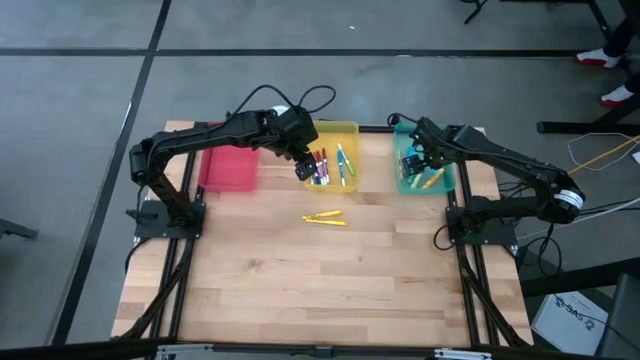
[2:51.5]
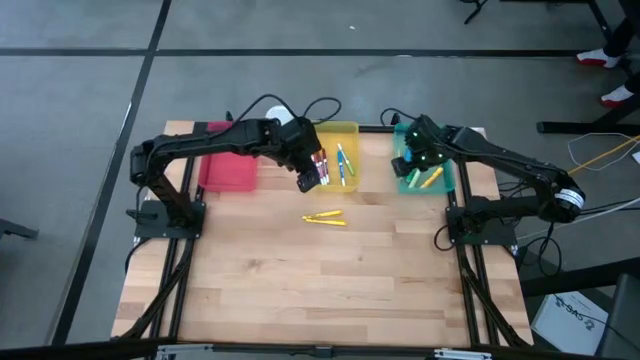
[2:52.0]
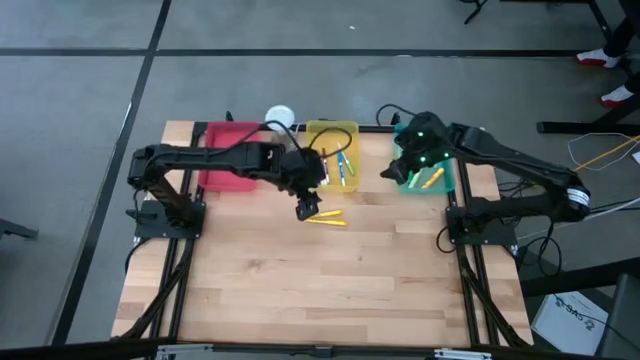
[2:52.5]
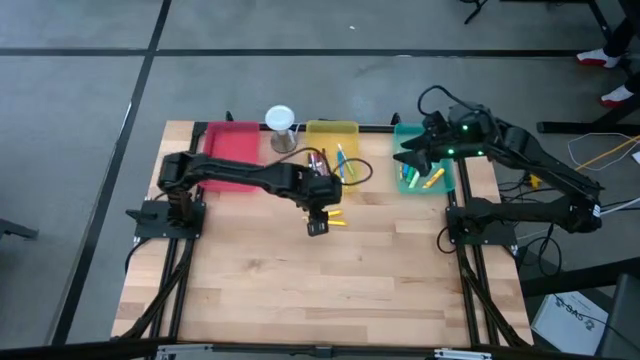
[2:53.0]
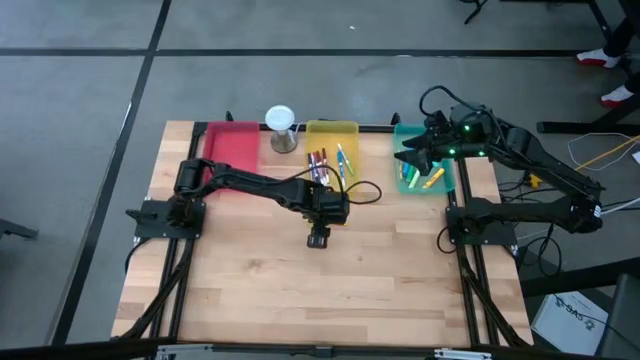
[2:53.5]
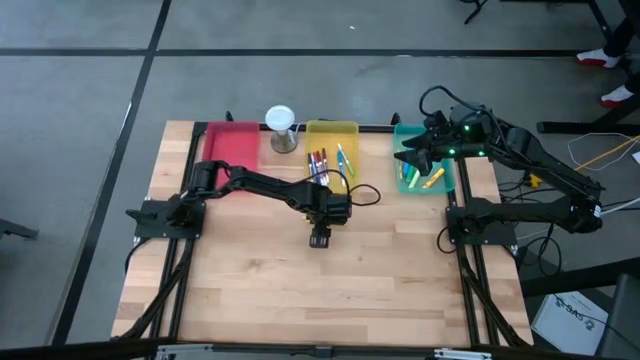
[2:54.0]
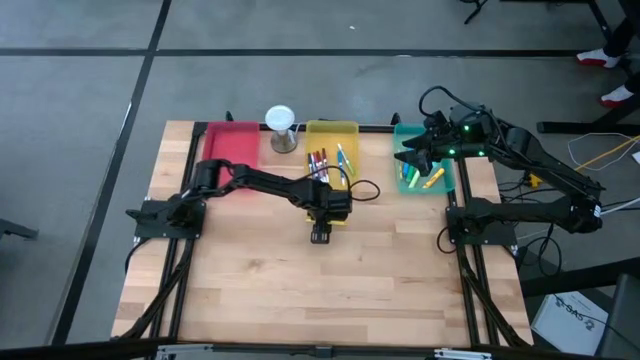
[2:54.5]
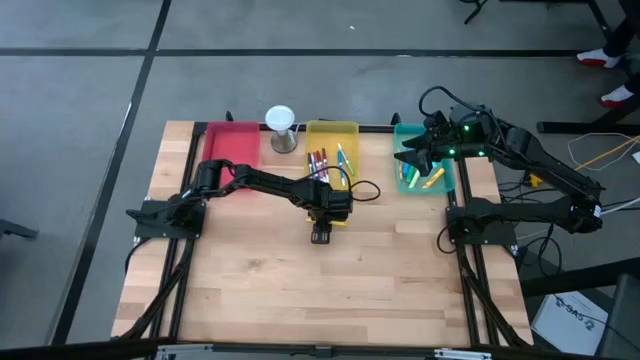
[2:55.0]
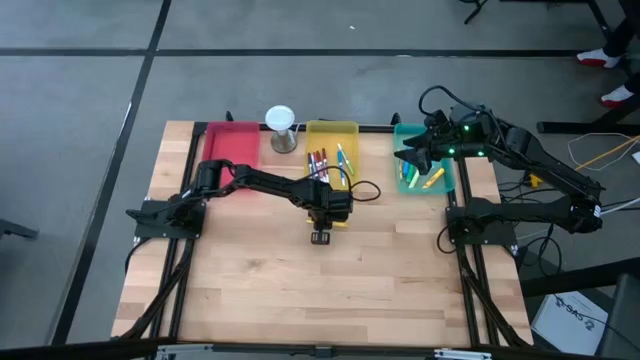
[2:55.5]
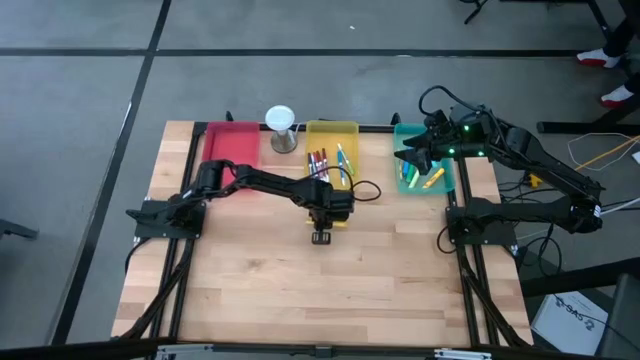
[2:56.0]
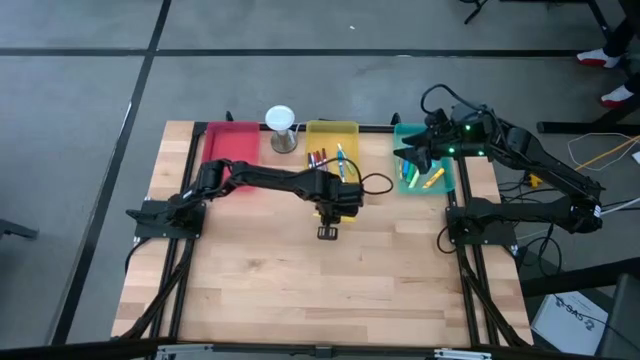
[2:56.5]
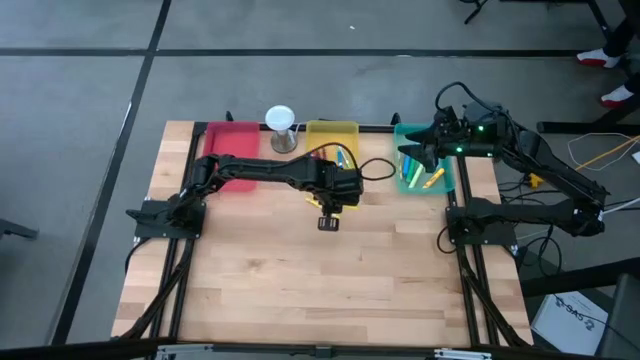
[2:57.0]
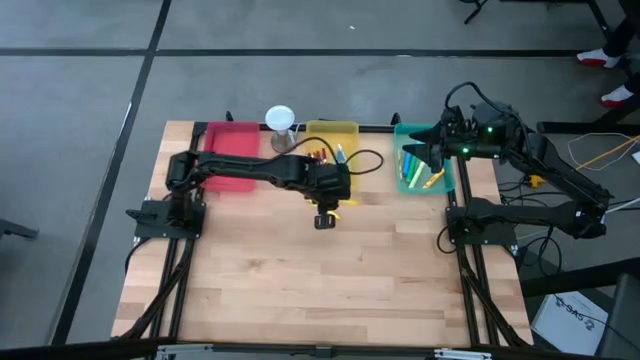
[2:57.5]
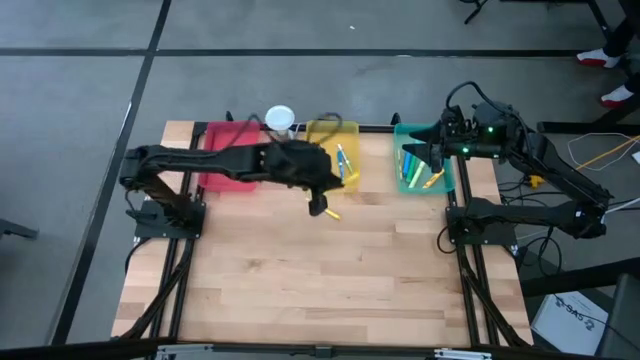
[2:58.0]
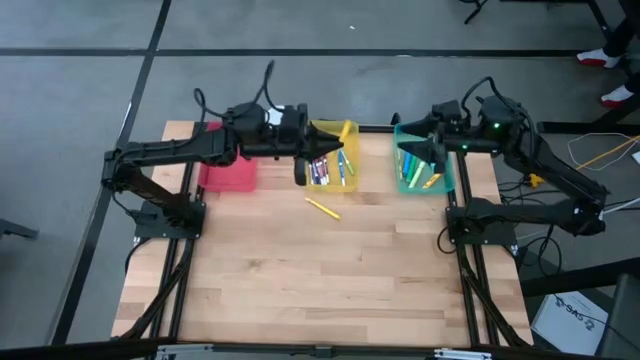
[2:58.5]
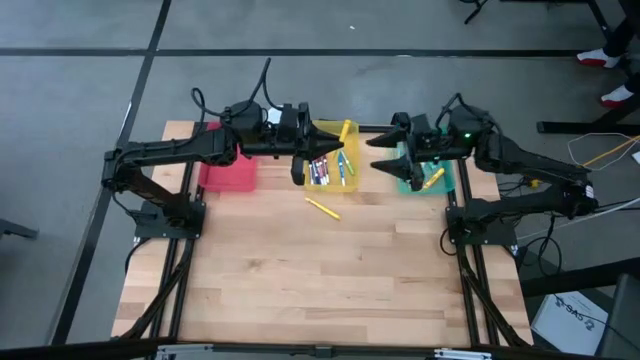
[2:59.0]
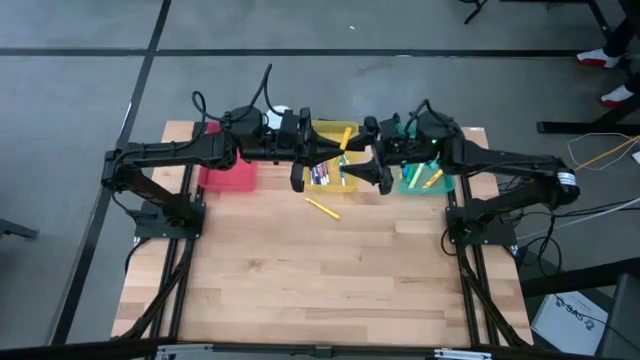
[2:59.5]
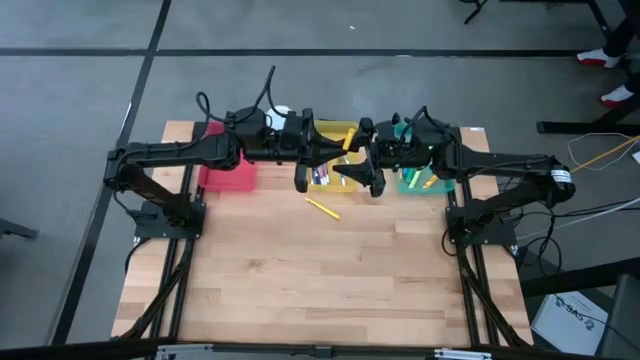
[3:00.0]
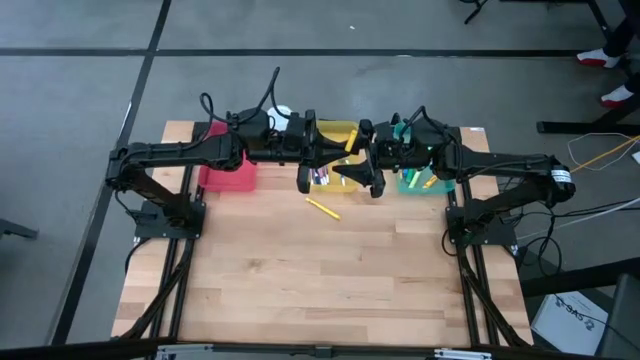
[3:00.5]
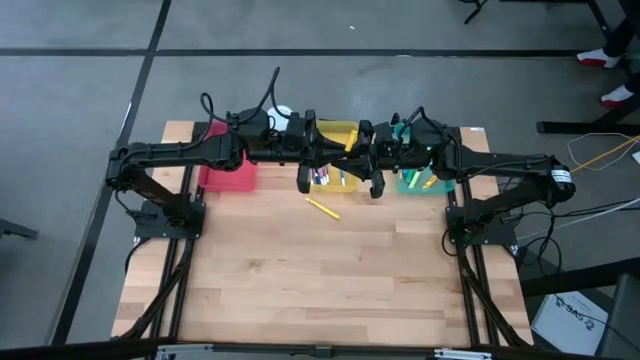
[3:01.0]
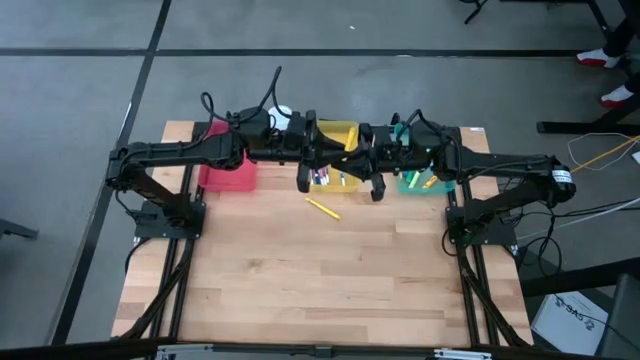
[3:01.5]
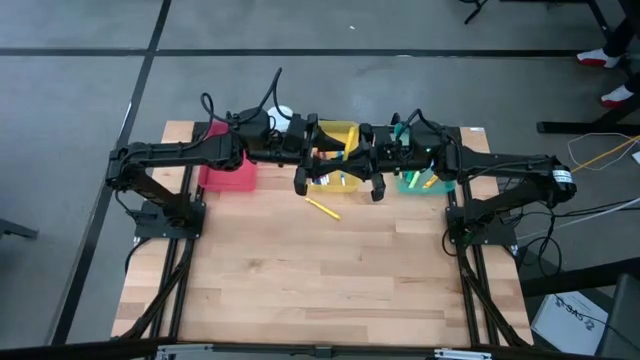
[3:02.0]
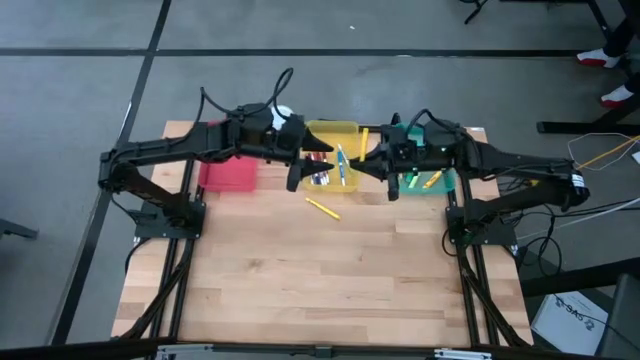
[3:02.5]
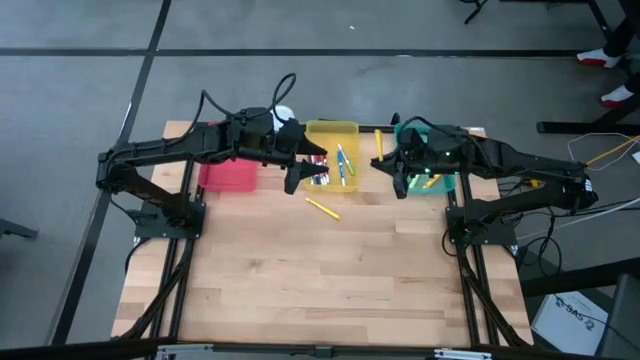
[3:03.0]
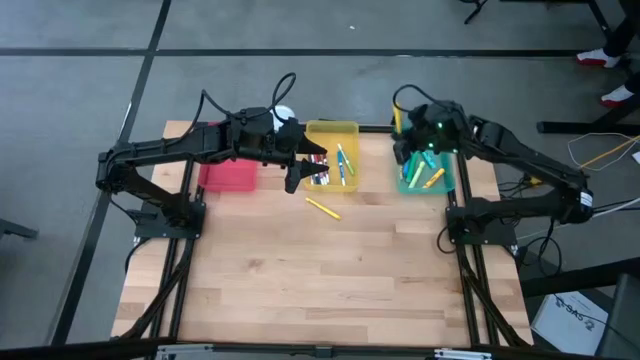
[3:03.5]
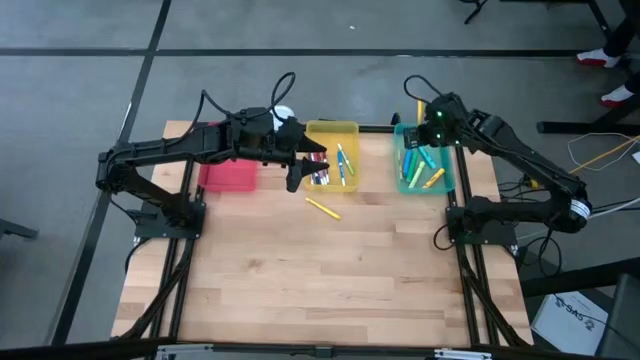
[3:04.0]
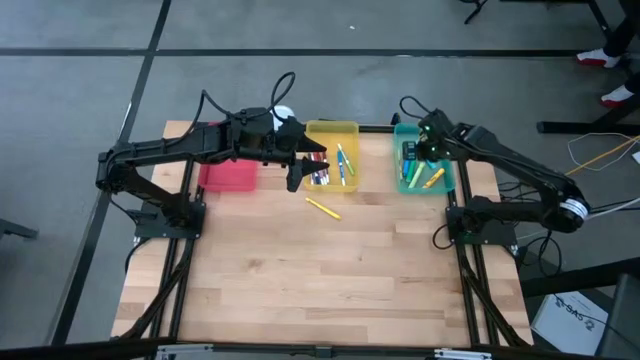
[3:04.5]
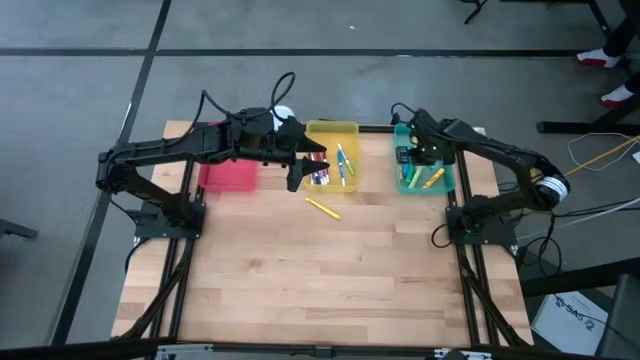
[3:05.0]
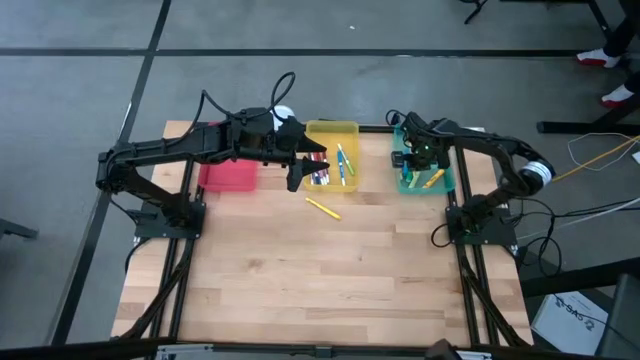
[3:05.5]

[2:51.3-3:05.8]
Task: Pick & Place Markers
Put the bottom yellow pen into the red bin

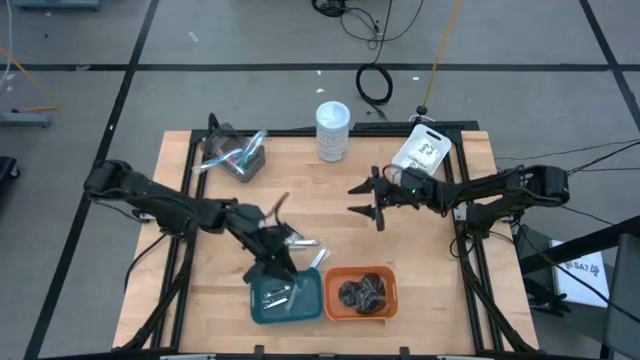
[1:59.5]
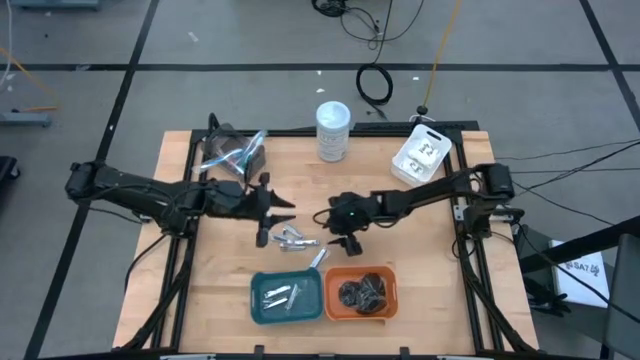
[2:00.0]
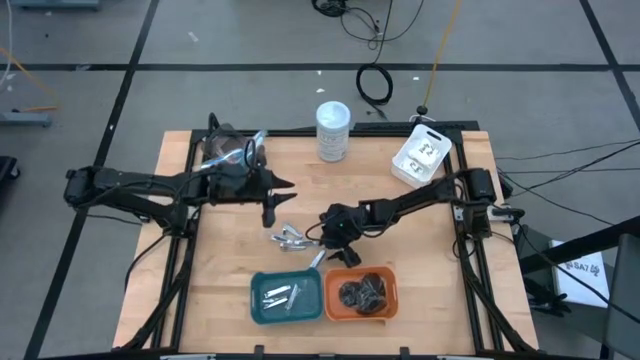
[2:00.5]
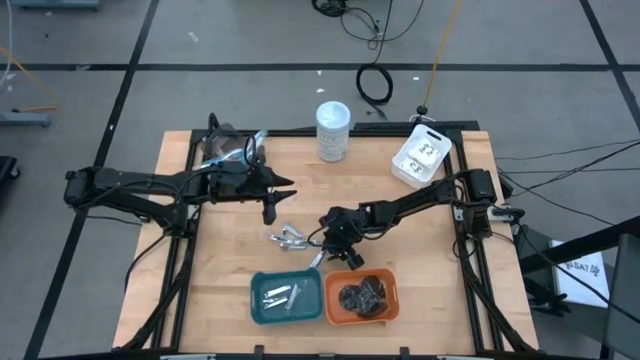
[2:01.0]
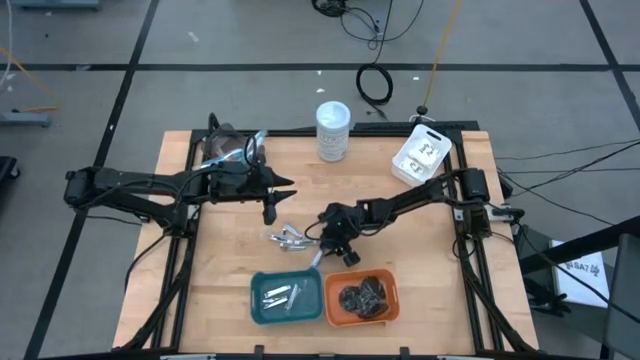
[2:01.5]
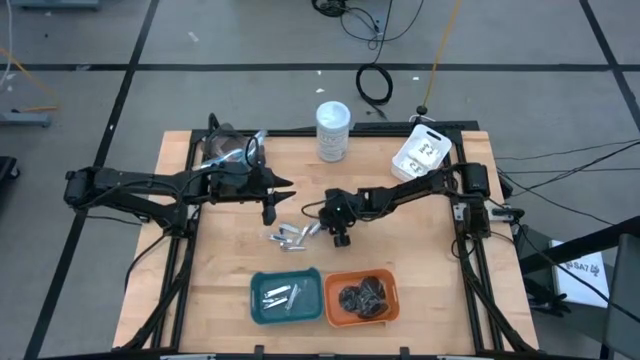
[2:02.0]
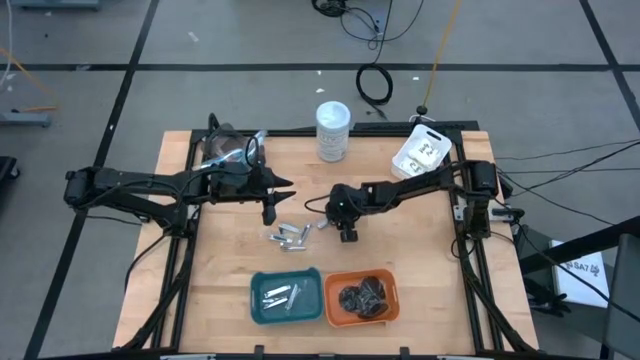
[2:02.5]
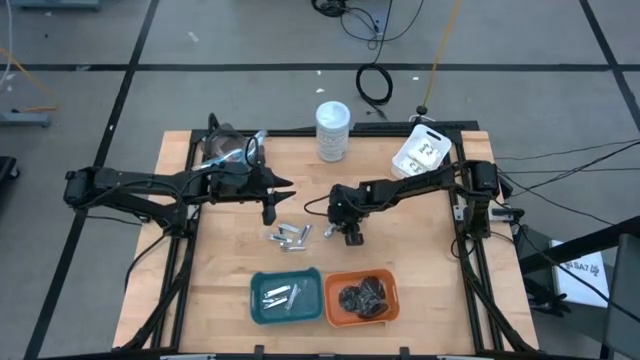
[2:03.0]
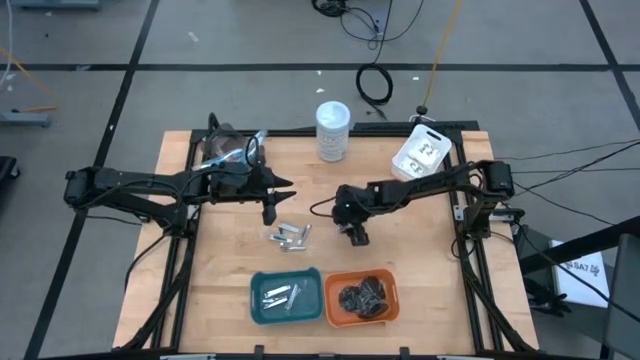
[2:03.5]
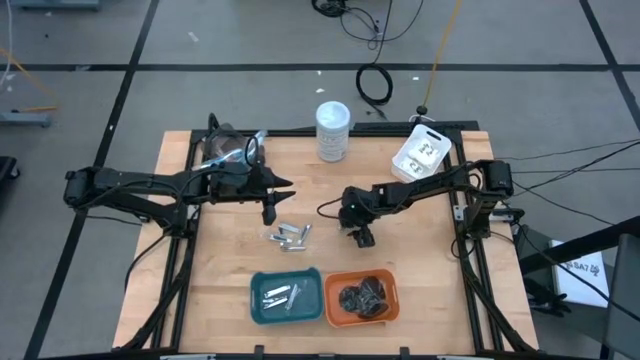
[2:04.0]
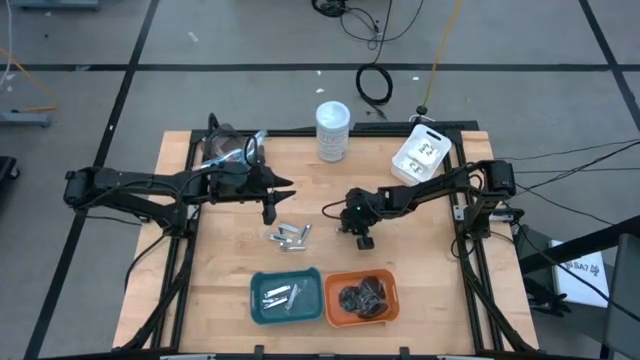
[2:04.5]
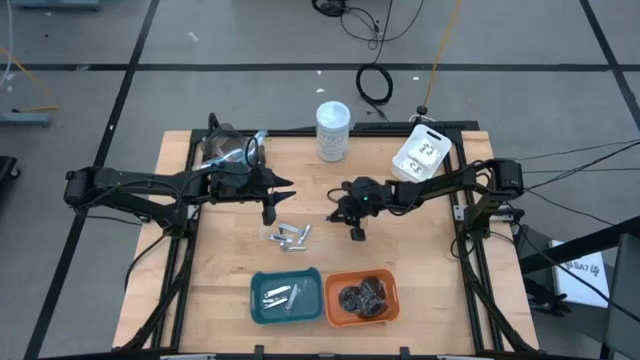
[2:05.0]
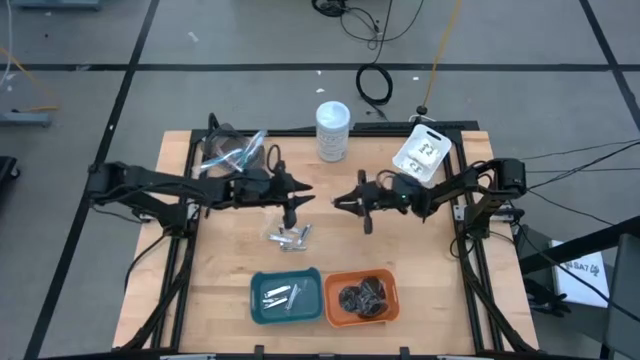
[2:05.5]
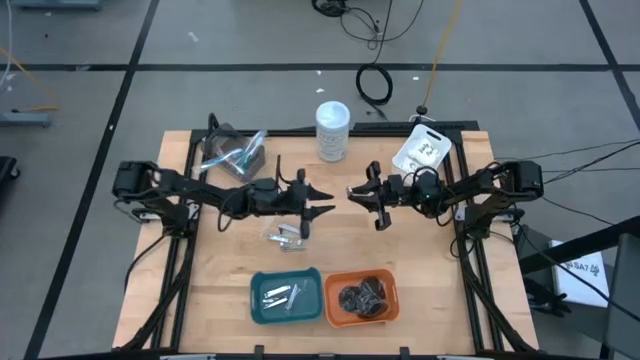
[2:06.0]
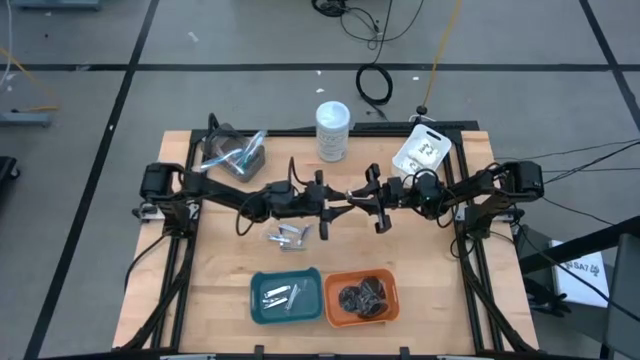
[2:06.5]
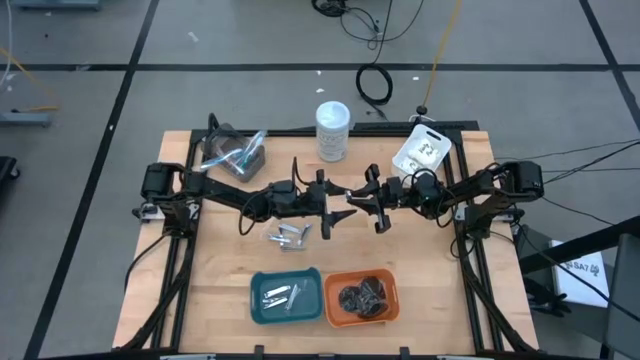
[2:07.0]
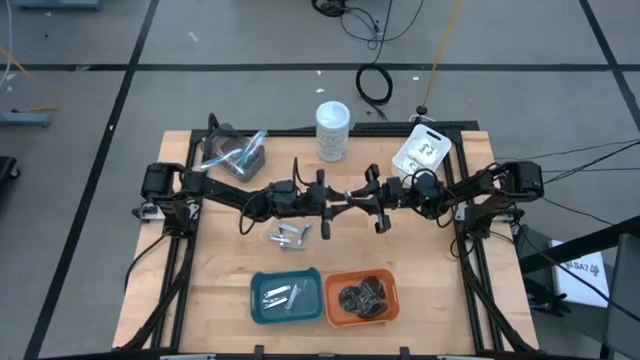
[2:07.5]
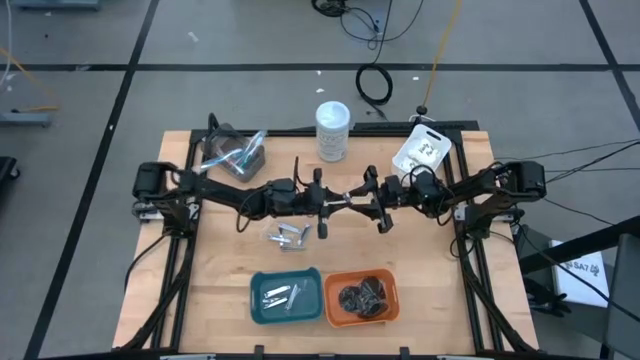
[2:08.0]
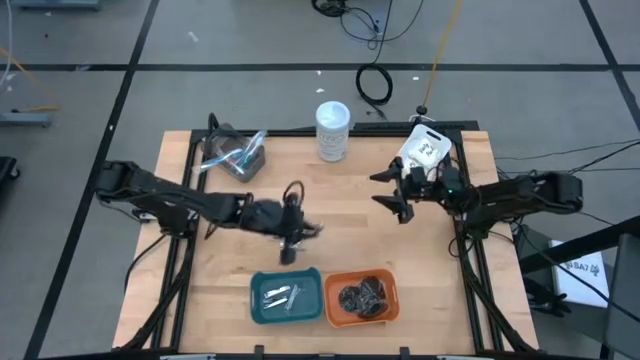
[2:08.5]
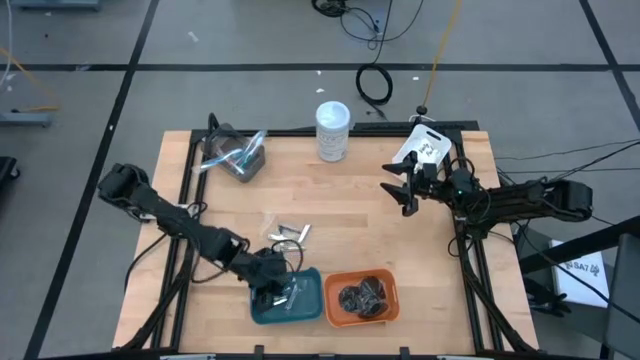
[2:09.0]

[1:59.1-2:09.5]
Task: Pick & Place Travel size toiletries
Put the silver nail cutter into the green bin
